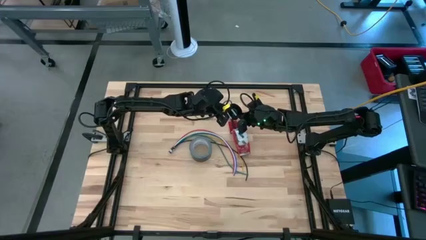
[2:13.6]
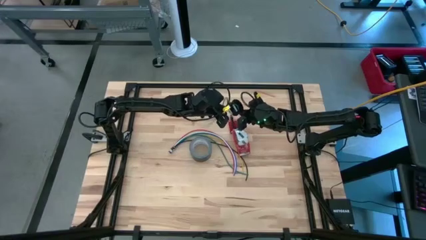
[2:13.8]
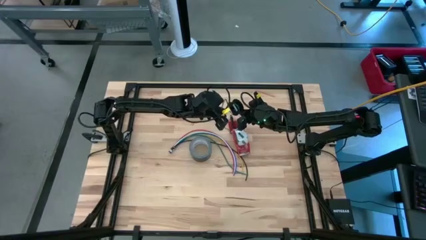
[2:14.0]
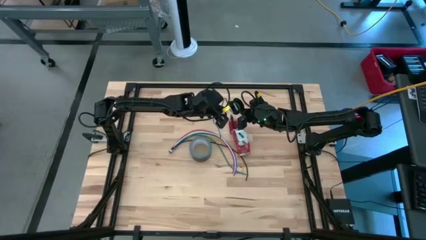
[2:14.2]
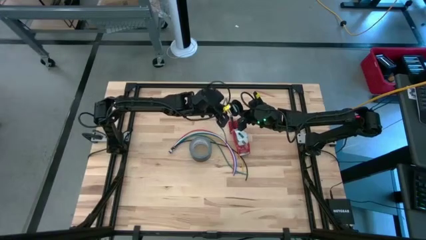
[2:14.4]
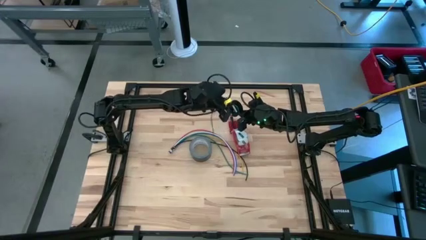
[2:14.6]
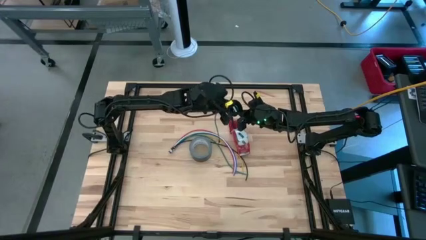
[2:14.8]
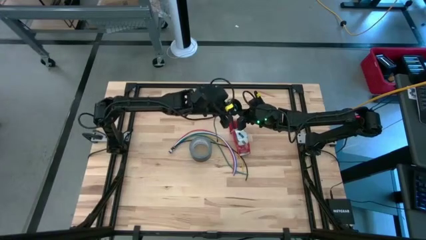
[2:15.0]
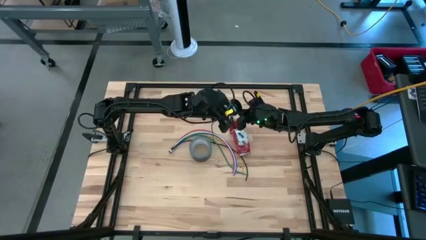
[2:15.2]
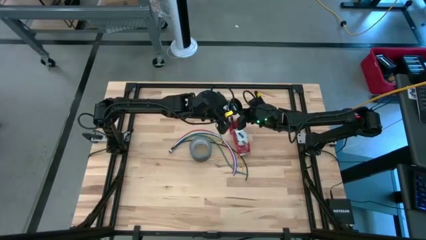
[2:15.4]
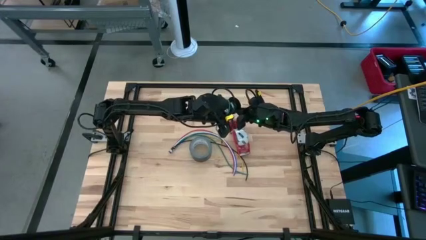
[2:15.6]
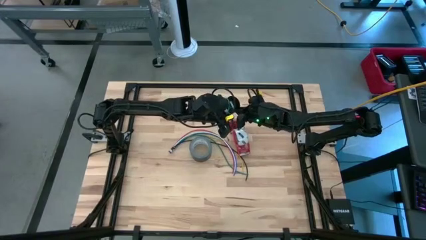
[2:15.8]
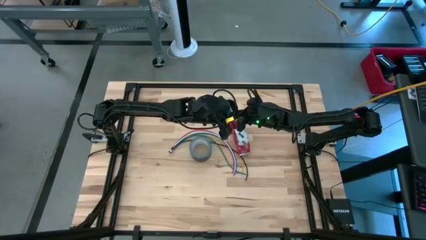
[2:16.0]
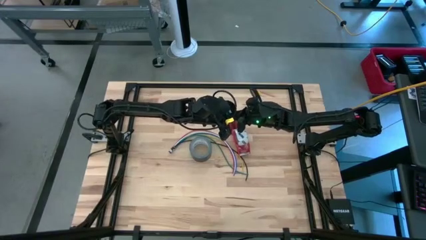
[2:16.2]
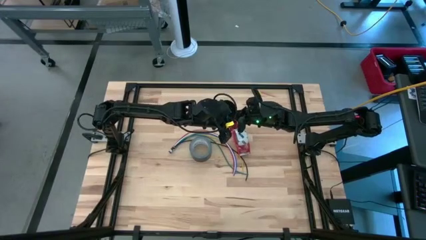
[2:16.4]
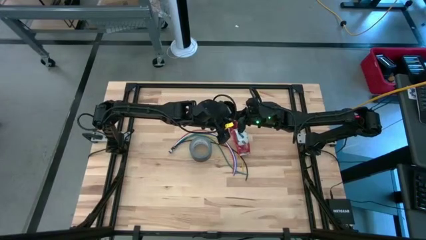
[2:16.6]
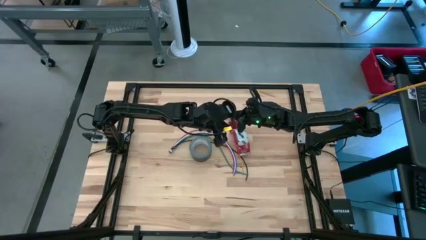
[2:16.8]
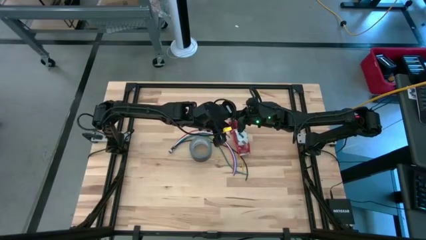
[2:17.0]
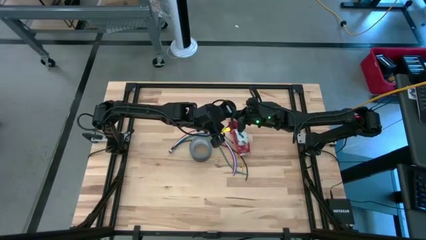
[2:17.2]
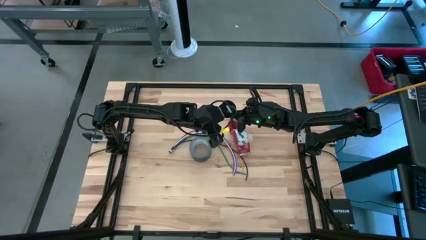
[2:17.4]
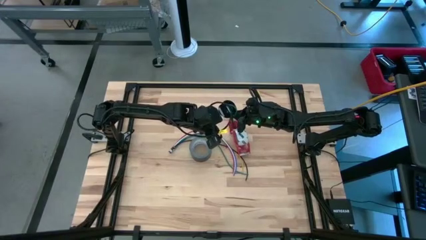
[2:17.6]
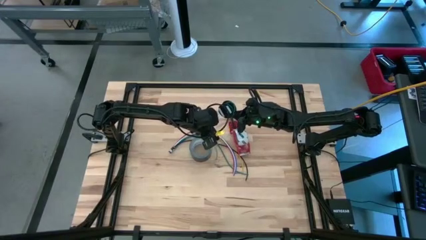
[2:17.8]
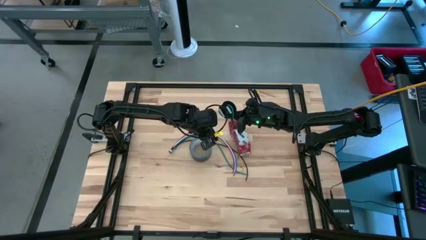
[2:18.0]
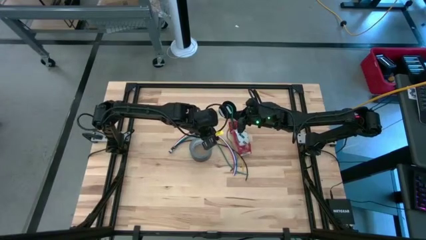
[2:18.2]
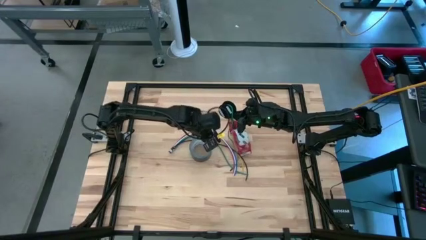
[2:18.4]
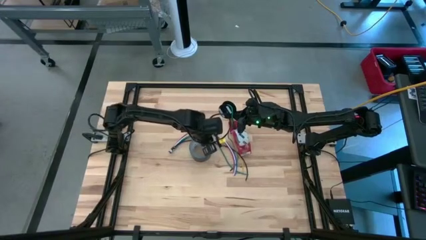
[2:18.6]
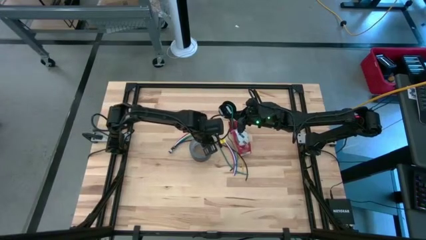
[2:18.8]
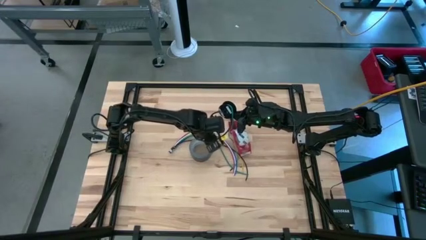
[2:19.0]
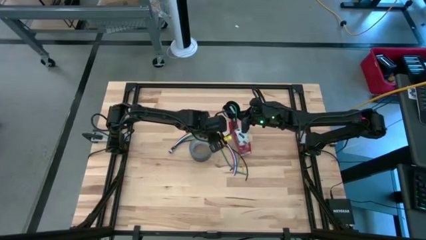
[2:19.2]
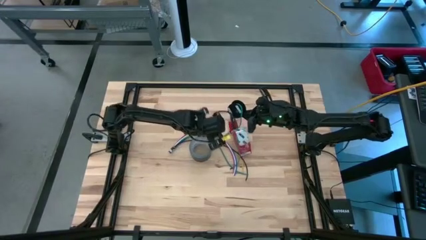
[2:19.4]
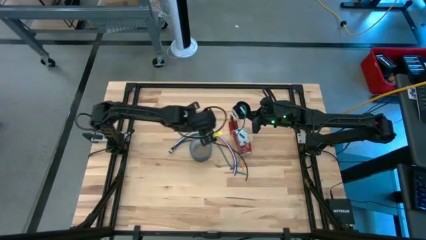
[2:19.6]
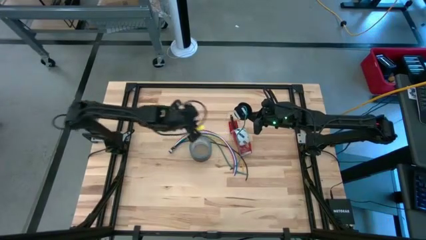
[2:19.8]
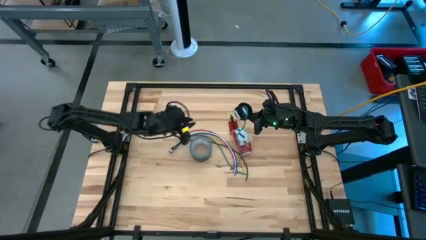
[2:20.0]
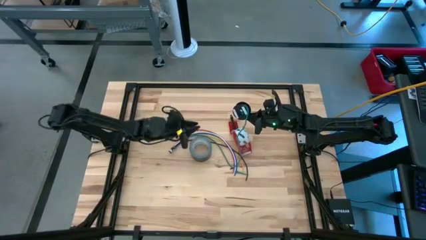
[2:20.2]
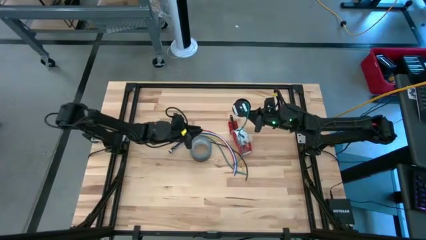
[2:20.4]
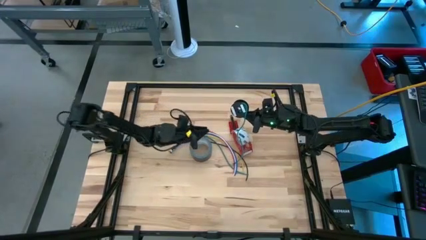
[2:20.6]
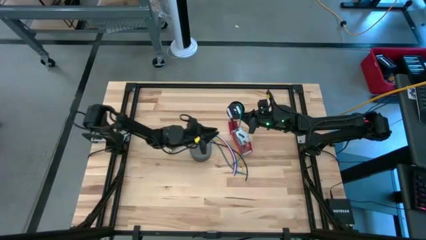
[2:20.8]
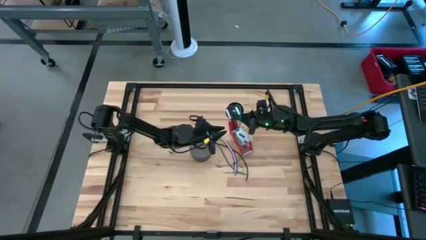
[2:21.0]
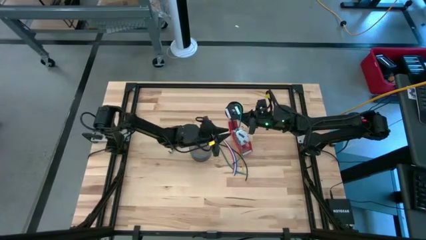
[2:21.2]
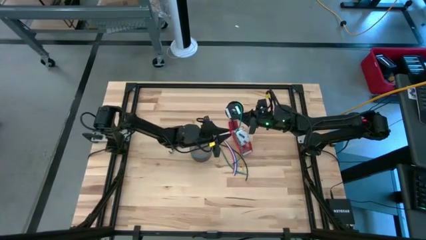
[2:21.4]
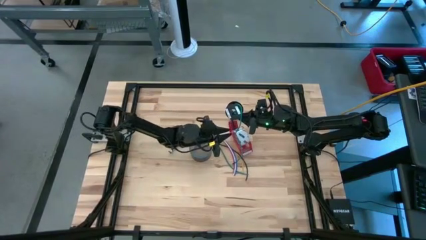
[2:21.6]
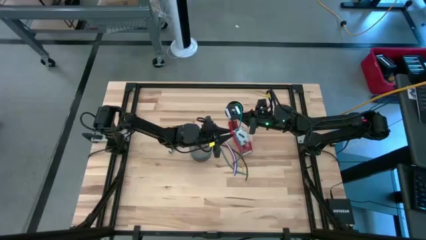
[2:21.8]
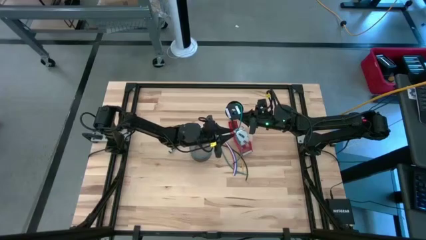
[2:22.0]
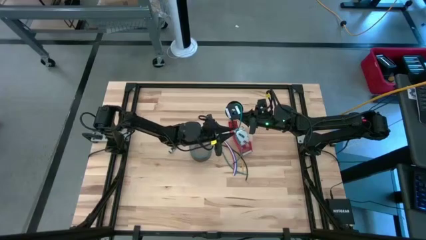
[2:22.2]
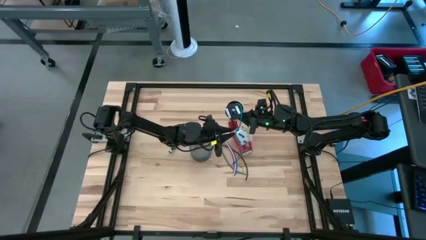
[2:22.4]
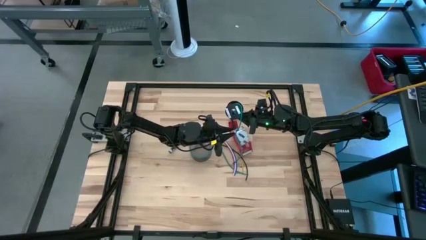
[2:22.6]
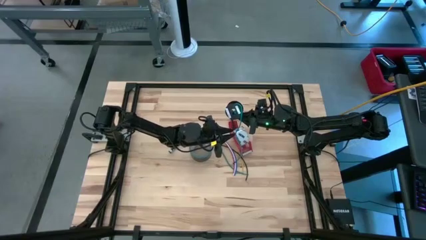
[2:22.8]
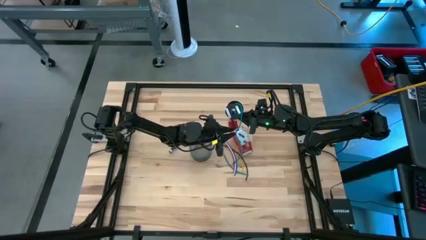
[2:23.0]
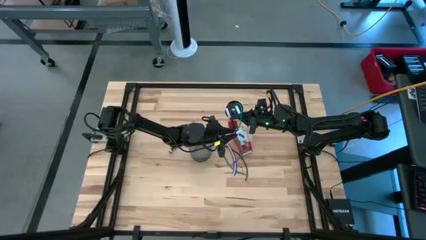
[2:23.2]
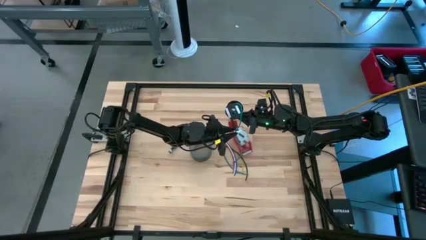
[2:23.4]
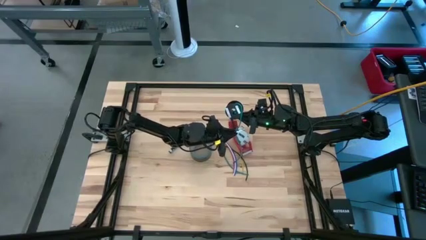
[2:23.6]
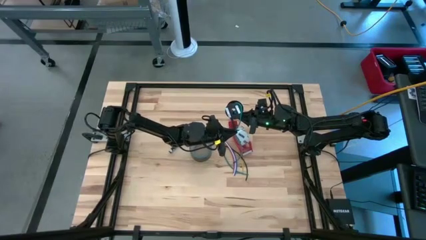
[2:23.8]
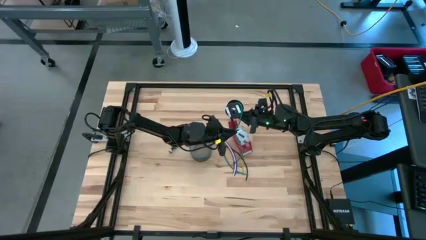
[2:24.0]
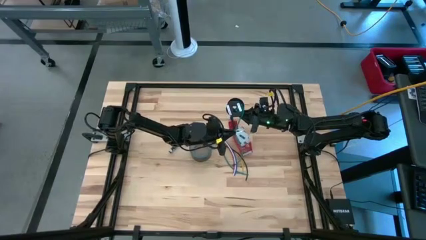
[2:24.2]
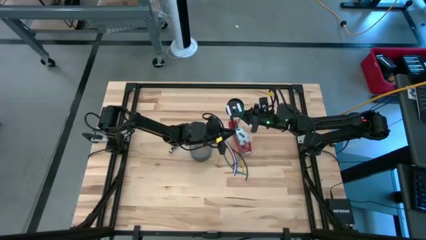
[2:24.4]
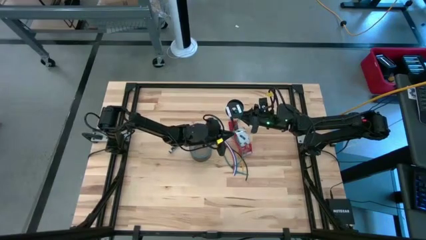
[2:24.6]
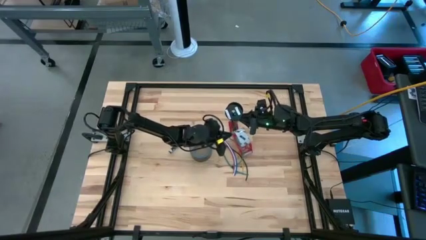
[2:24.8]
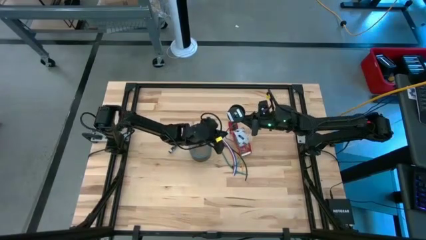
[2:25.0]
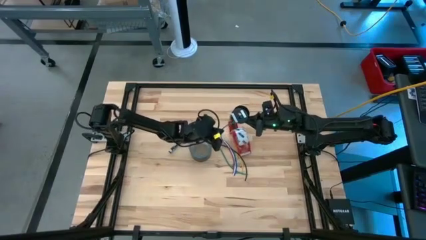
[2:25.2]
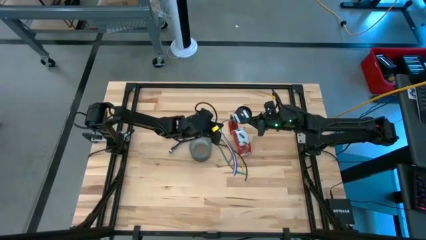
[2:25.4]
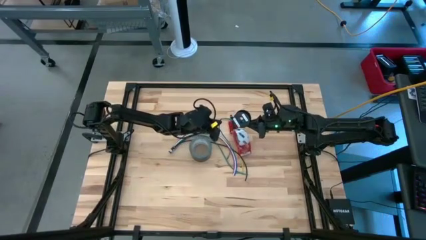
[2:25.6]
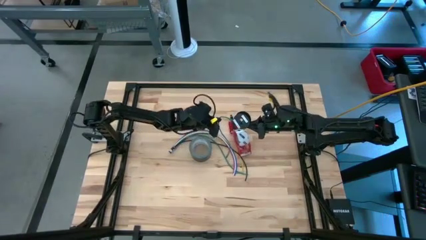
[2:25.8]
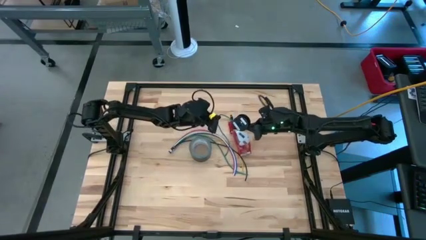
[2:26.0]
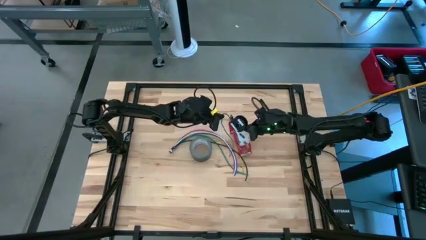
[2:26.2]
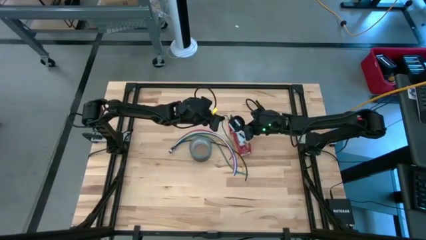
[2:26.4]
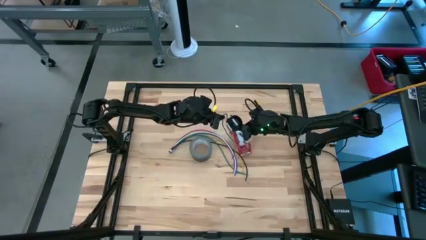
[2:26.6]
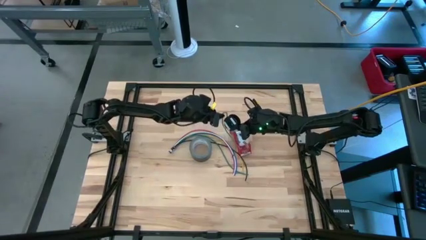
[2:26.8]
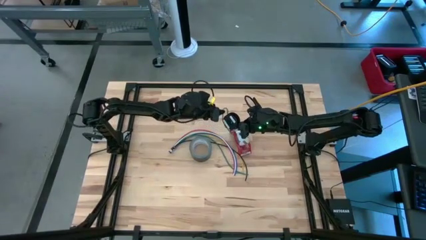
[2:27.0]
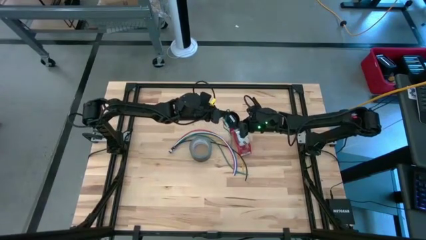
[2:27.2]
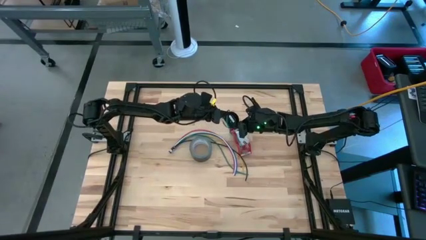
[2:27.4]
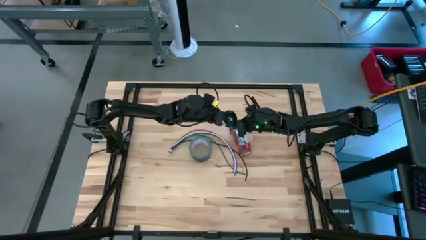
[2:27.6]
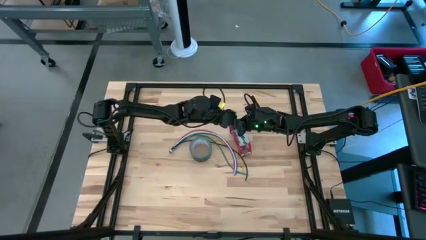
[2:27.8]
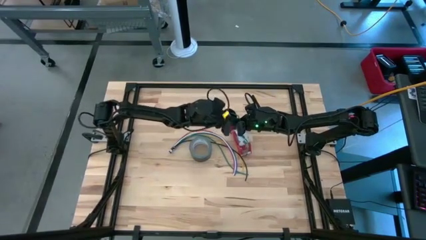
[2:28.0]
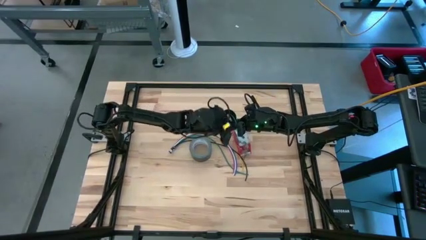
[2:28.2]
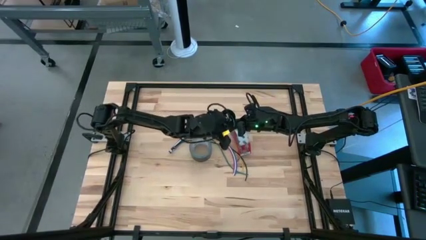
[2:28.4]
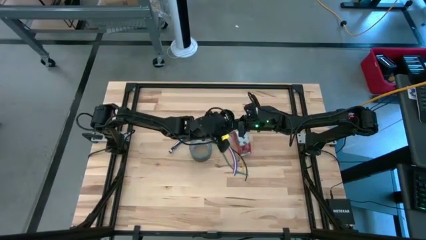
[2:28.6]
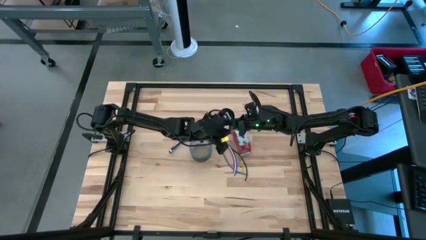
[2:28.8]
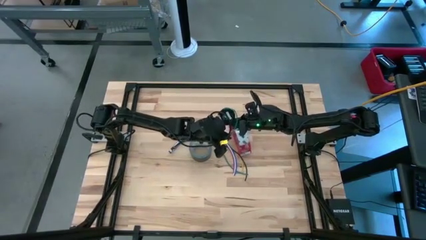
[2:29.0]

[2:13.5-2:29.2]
Task: Coil cords
Coil the green wire into the spool

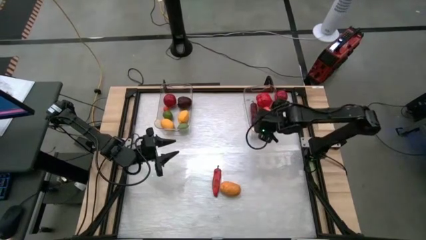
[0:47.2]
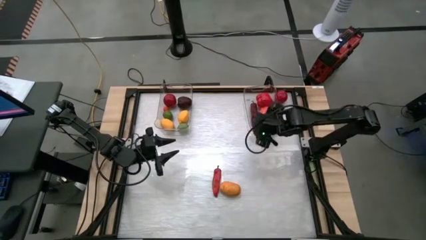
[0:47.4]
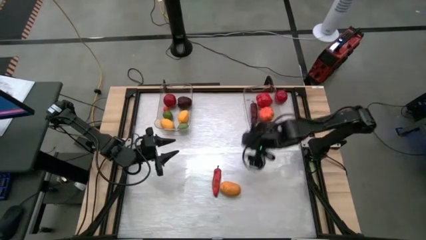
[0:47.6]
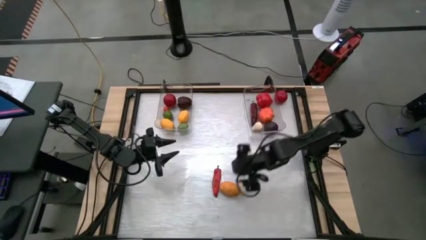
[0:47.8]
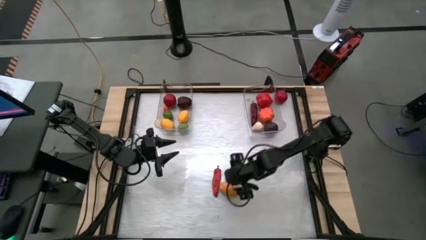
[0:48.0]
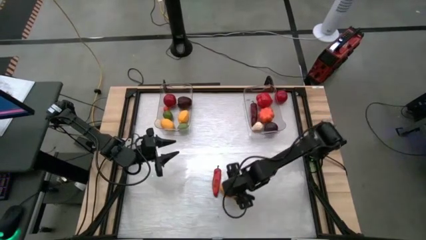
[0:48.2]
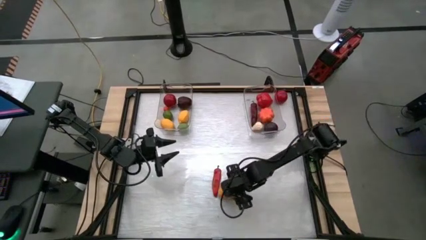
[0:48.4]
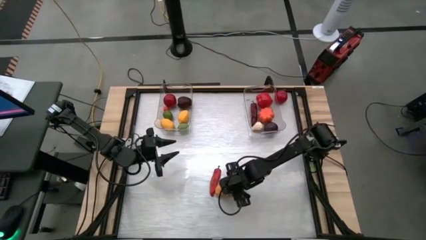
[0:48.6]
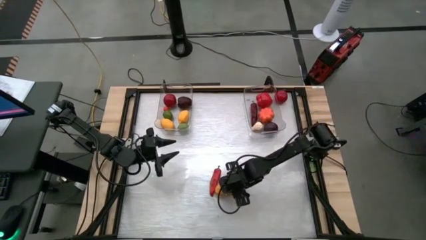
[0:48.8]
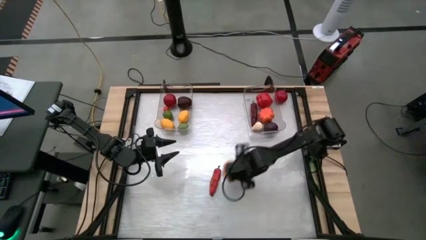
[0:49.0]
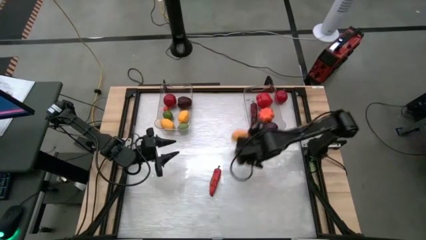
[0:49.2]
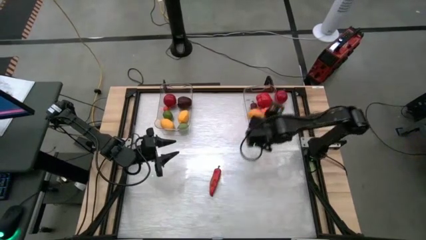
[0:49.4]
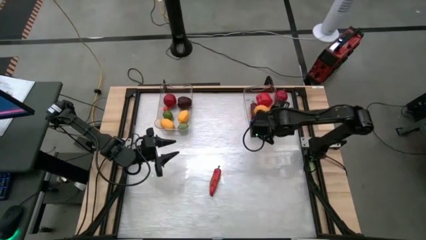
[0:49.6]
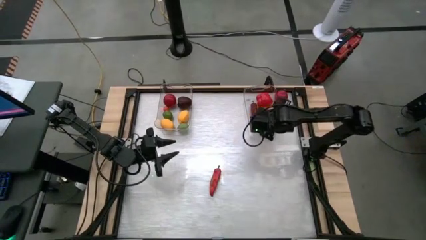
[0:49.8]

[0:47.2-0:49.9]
Task: Sort produce into baskets
Put the potato into the right transparent bin
